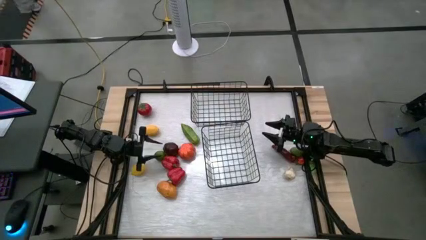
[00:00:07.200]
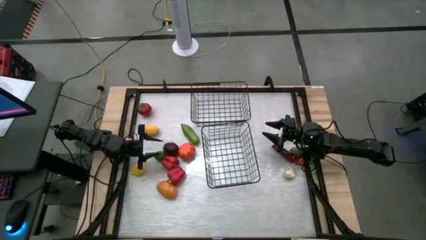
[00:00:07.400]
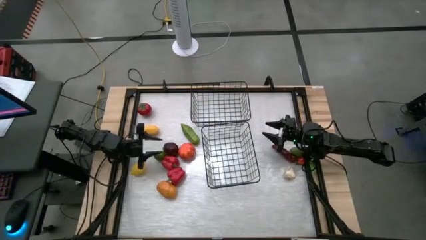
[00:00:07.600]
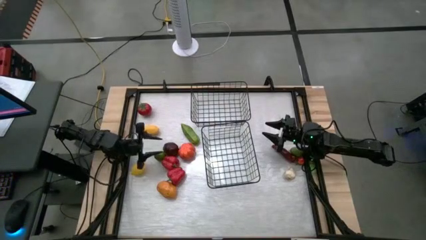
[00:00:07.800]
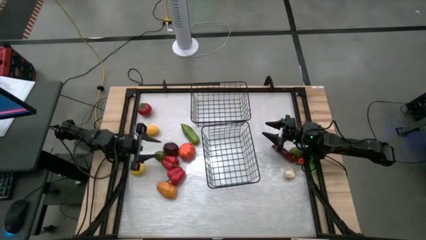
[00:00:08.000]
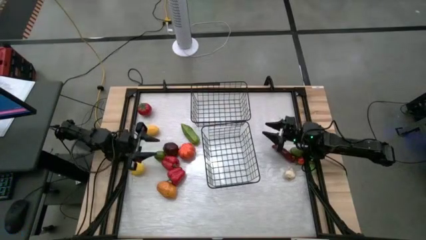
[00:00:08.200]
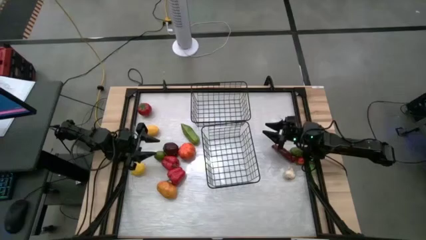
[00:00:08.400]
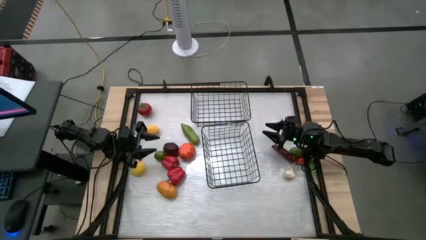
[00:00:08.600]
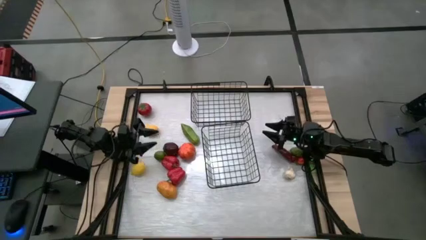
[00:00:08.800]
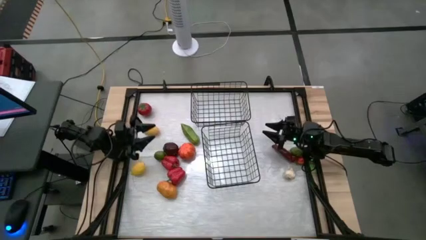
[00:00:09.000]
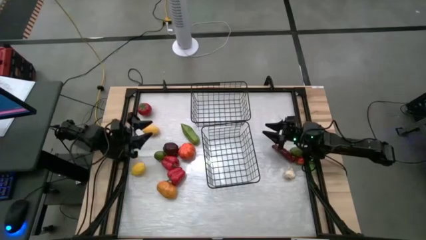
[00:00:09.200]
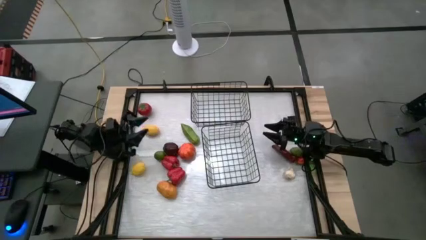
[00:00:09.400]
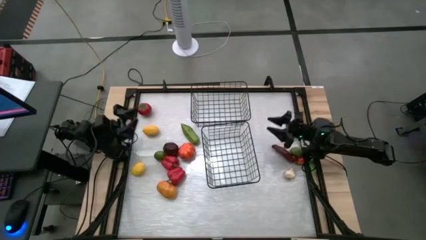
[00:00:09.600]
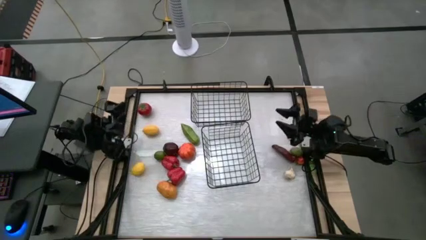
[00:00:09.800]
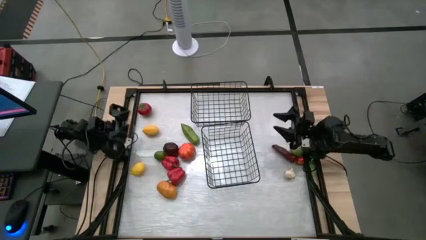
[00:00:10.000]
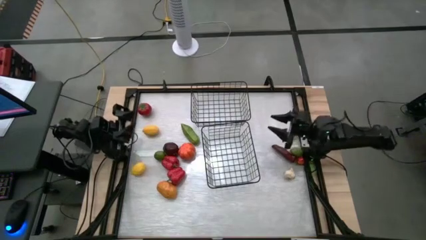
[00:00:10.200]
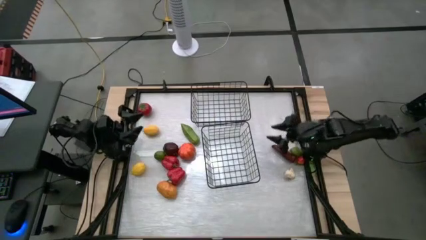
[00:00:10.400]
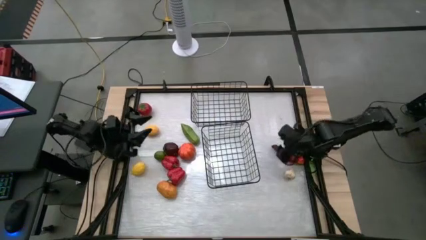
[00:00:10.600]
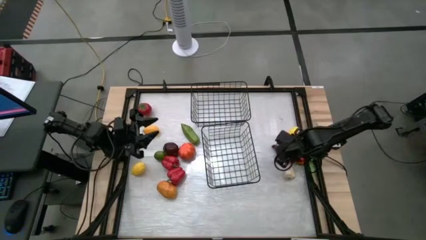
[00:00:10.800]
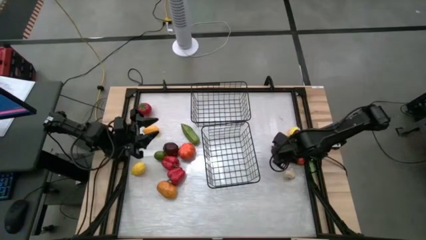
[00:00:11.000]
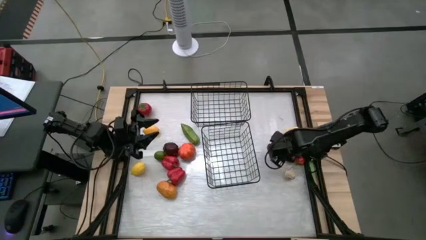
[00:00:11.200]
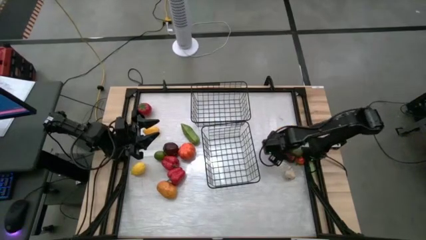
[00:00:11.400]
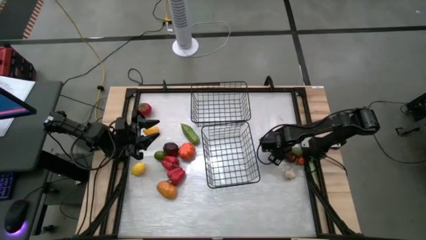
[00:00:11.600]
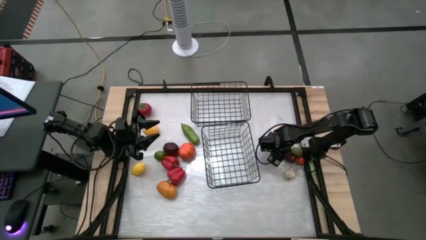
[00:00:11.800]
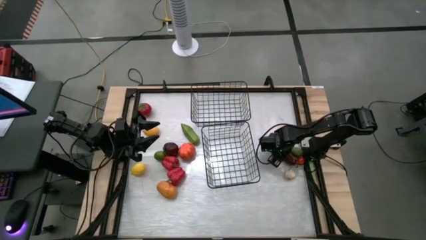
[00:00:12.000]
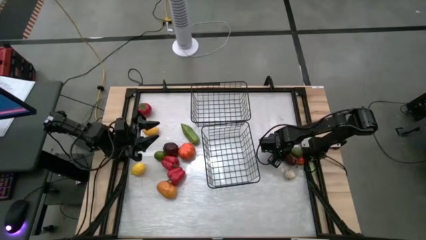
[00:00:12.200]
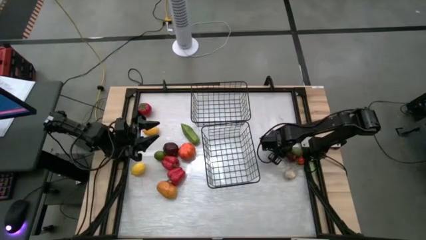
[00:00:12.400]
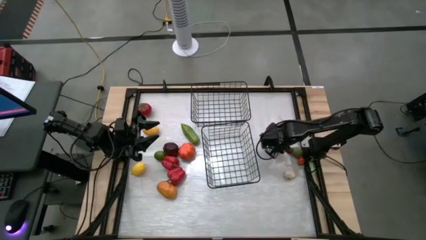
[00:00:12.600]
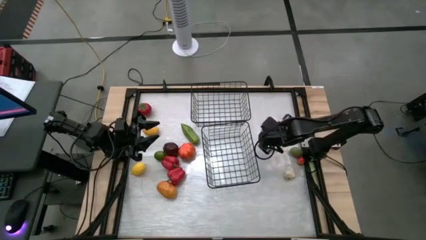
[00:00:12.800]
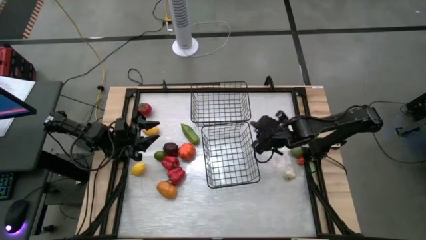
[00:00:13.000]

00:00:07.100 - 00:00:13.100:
Task: Sort produce into baskets
Put the red chili into the bottom wire basket

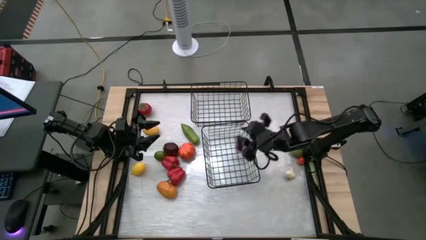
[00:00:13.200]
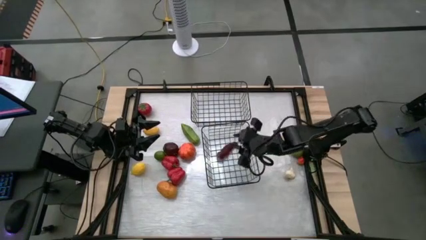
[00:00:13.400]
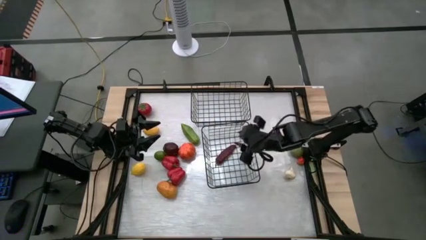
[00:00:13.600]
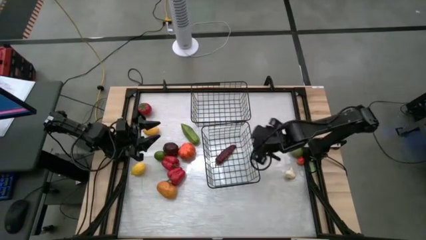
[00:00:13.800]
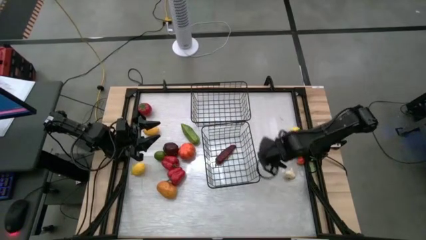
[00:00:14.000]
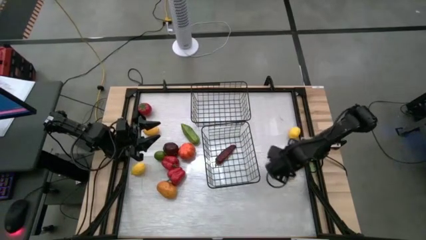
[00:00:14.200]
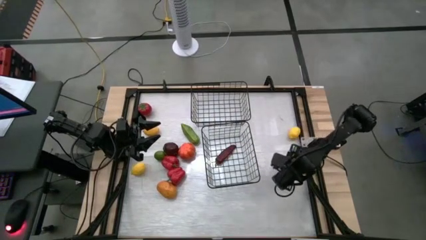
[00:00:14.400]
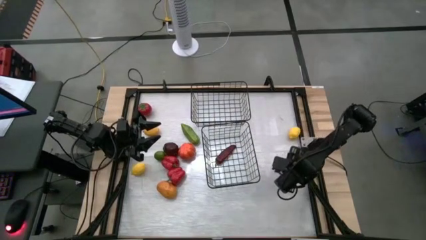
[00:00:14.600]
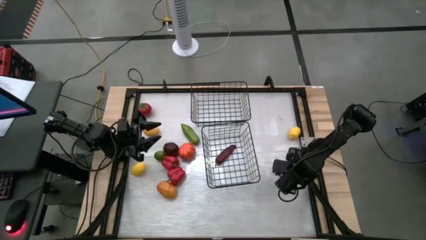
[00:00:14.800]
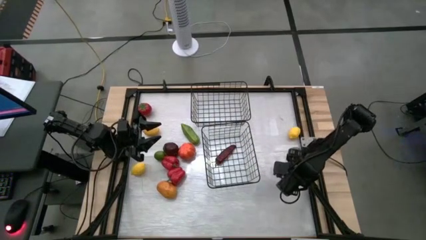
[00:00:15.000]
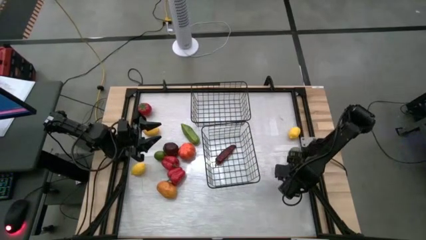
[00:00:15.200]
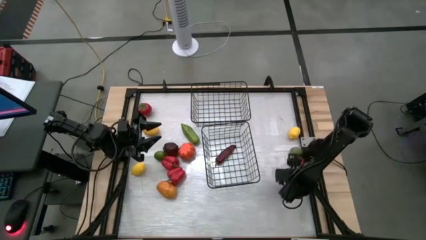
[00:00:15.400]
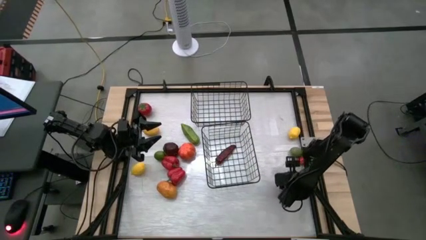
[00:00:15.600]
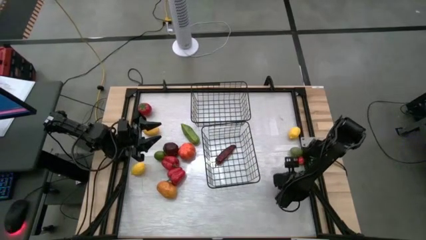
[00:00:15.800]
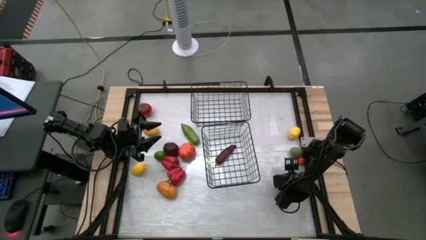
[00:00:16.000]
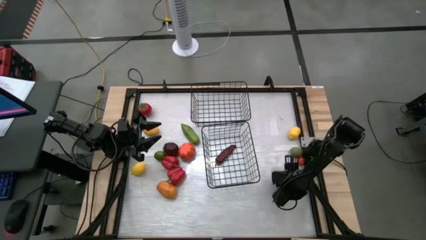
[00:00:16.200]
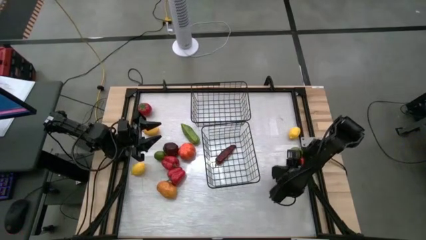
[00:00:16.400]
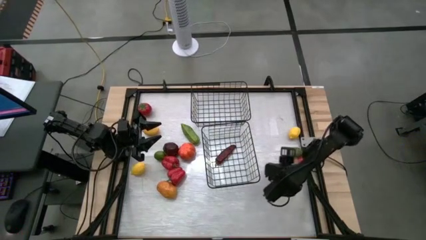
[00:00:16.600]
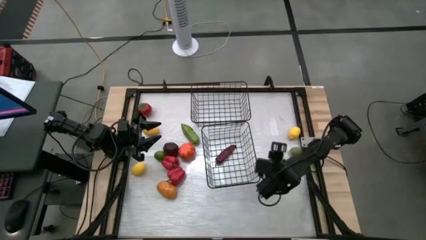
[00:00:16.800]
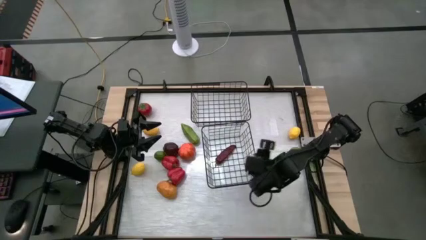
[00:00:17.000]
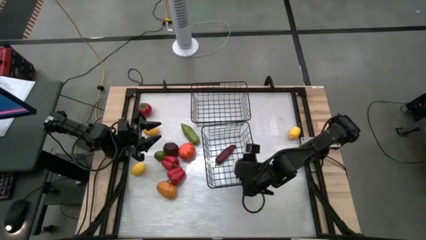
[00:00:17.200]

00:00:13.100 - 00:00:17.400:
Put the garlic into the bottom wire basket

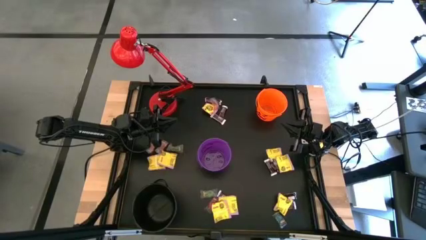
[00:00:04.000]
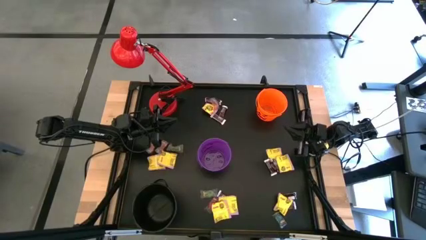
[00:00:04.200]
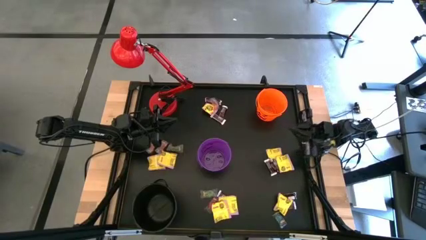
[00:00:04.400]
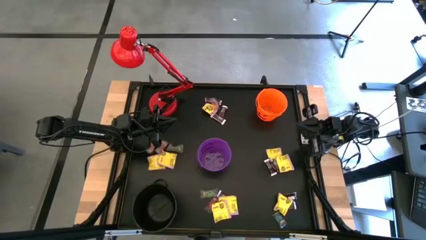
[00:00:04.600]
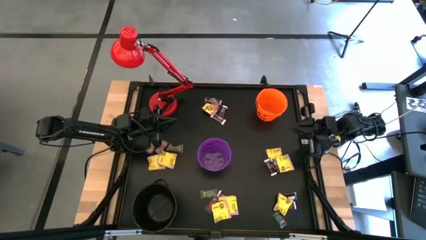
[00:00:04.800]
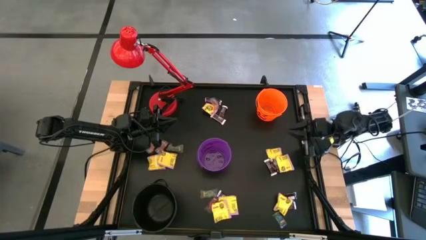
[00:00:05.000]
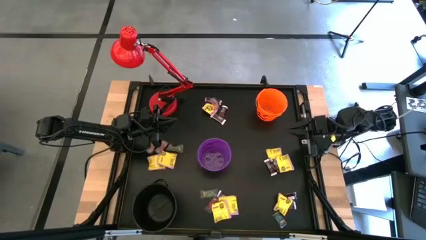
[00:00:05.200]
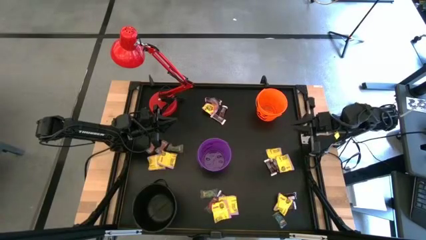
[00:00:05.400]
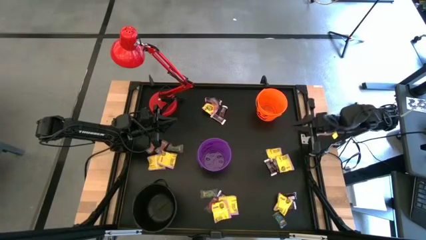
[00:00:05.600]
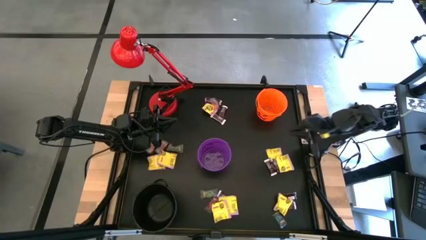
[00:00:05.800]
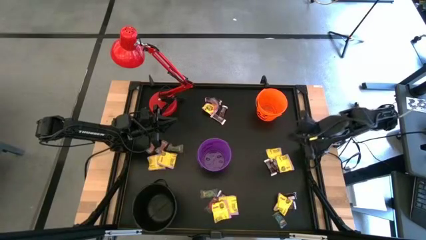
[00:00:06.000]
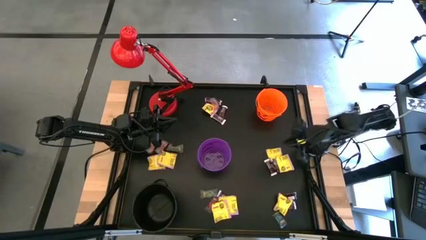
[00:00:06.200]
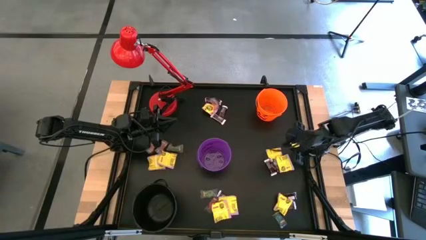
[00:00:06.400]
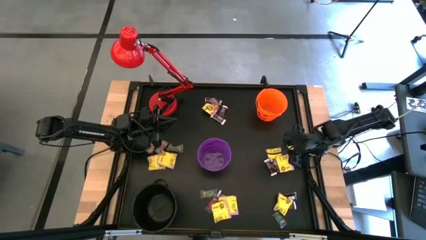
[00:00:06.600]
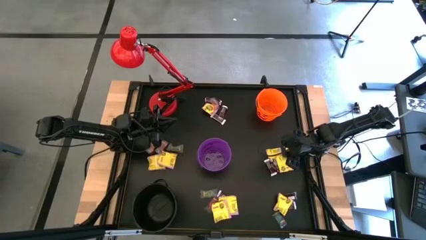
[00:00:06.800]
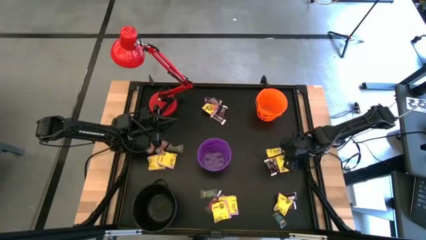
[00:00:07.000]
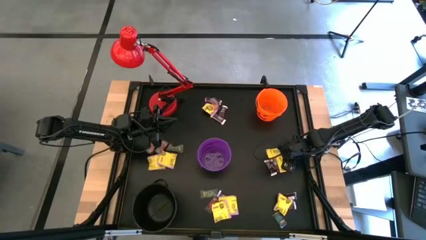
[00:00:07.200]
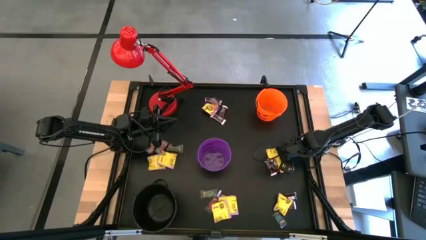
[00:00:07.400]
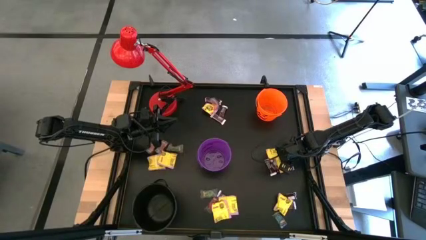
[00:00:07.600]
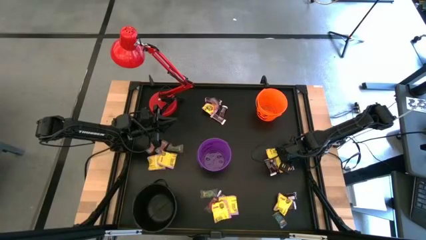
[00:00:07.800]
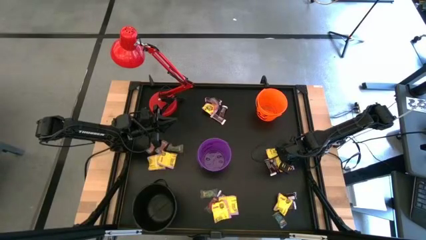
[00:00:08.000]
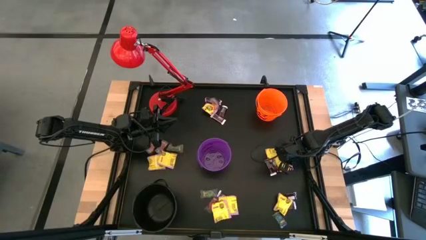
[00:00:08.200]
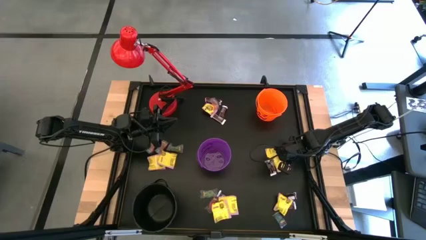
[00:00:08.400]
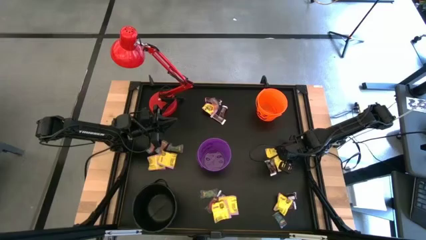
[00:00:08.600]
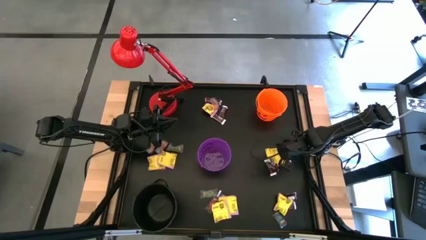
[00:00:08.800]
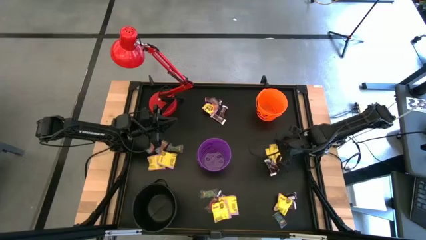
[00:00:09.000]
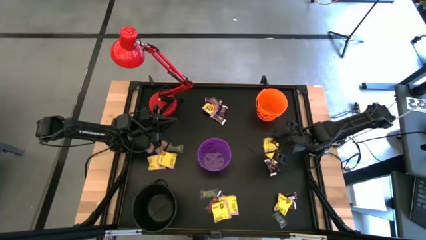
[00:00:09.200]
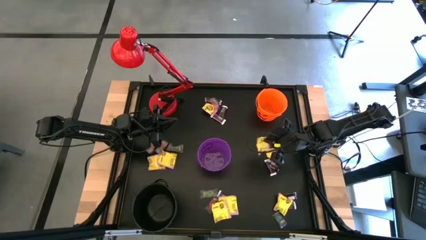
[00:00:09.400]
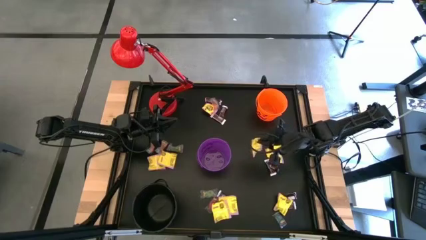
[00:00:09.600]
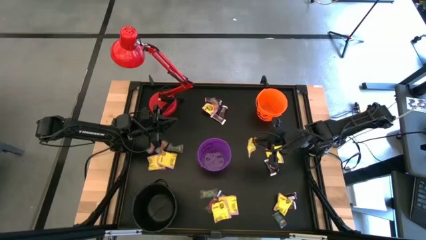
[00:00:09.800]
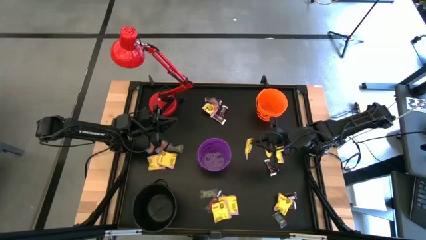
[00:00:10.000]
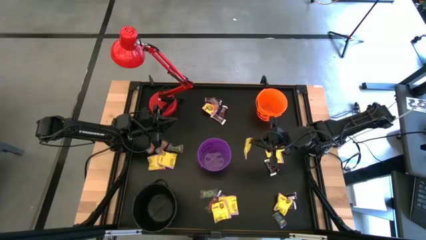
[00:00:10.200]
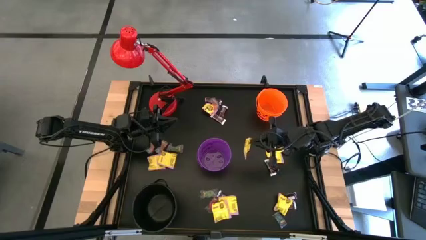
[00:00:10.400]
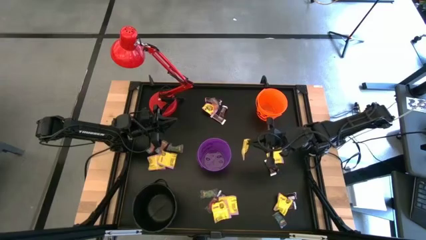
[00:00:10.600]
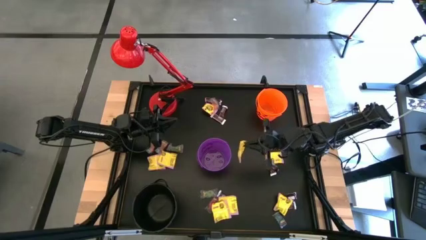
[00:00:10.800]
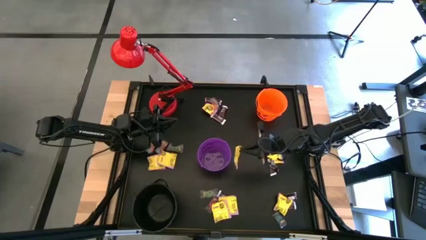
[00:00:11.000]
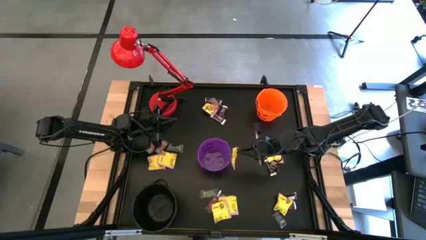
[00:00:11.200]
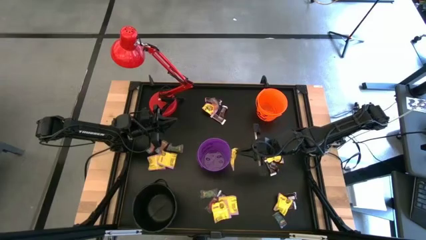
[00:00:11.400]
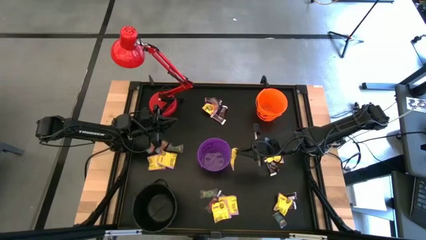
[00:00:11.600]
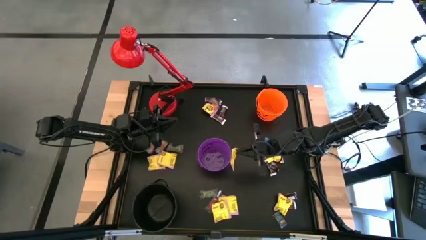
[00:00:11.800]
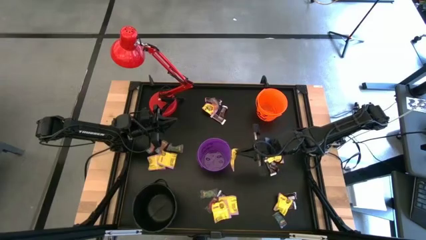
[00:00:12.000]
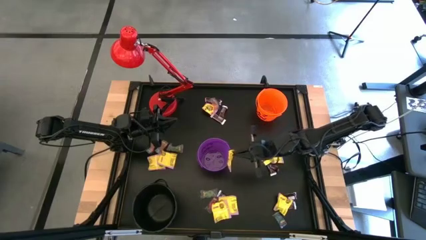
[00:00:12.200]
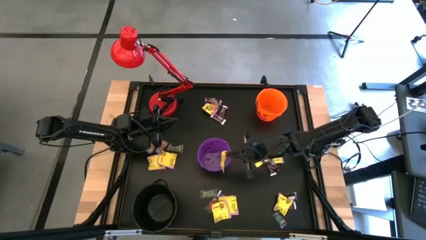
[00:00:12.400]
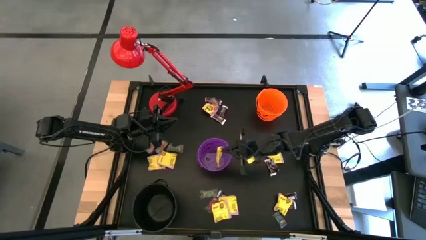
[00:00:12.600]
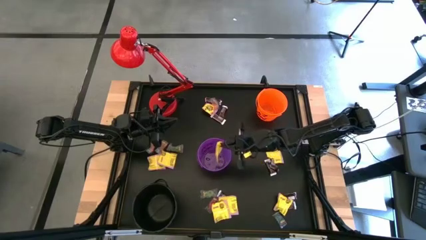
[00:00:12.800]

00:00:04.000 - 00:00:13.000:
Task: Sort candy
Put the yellow candy into the purple bucket
